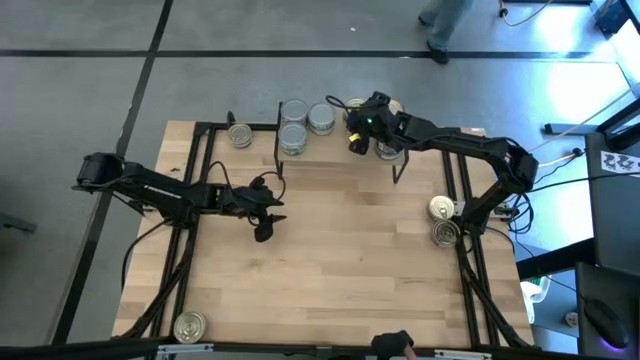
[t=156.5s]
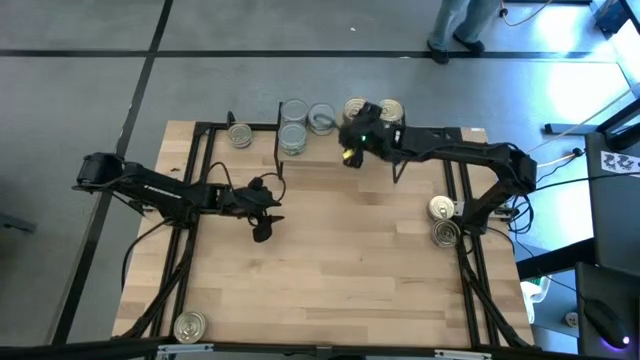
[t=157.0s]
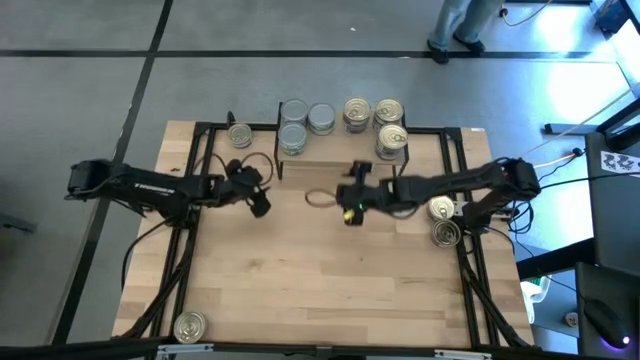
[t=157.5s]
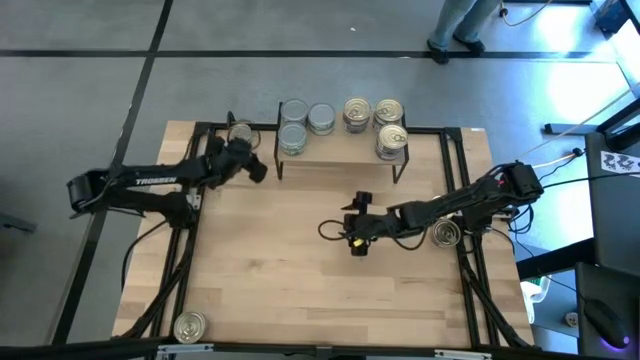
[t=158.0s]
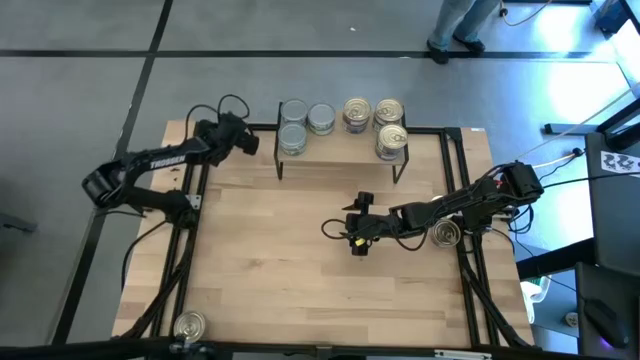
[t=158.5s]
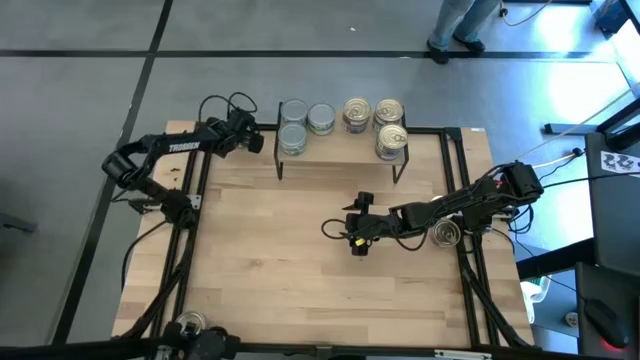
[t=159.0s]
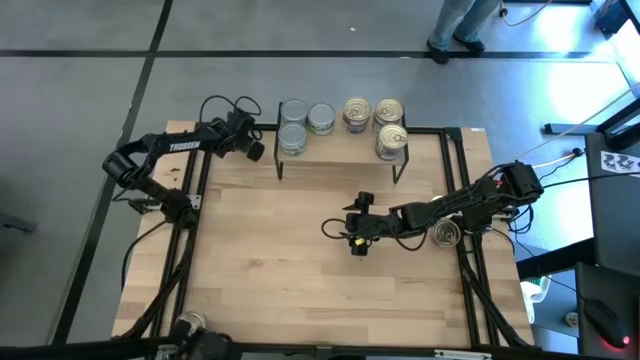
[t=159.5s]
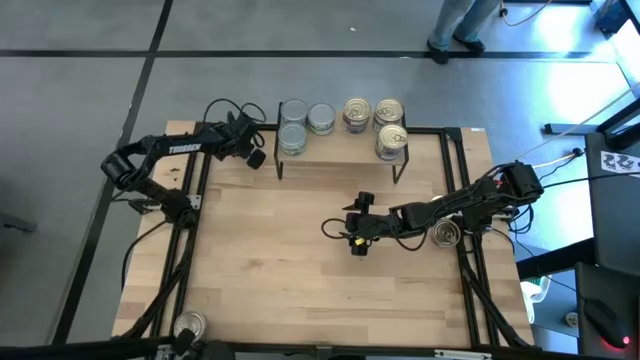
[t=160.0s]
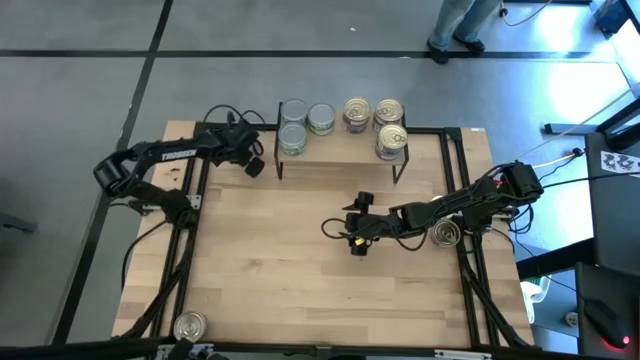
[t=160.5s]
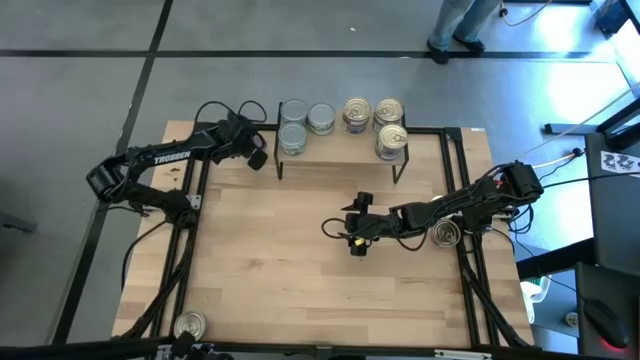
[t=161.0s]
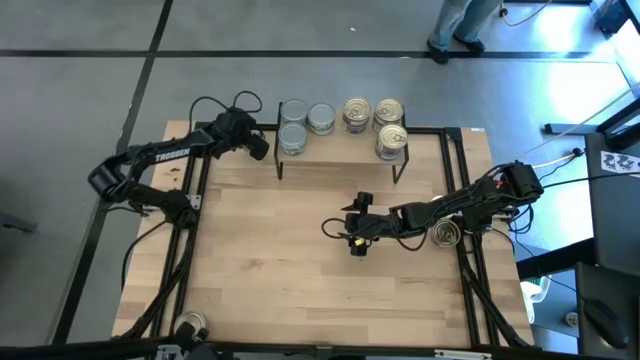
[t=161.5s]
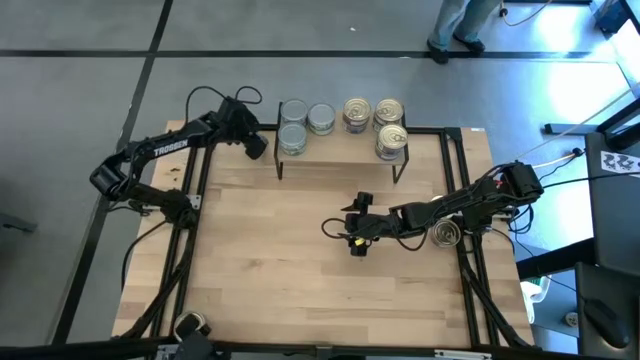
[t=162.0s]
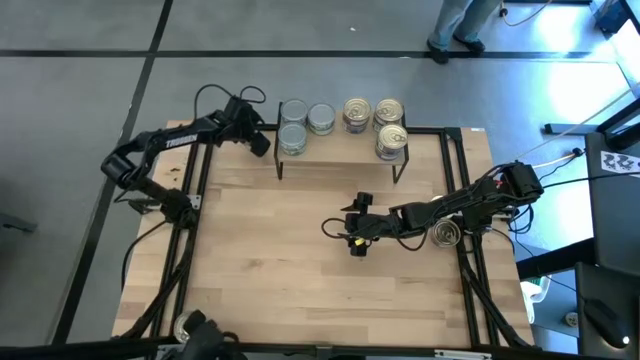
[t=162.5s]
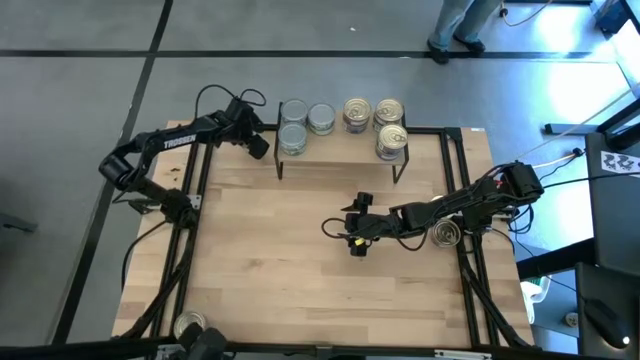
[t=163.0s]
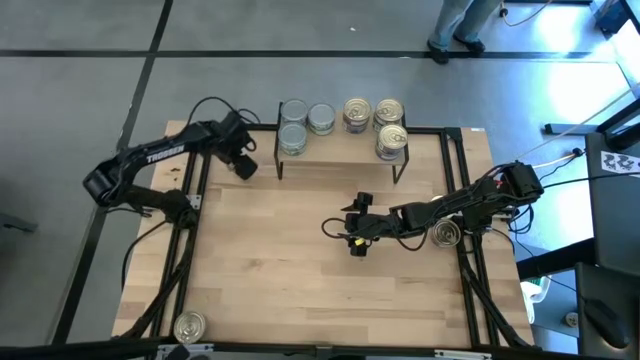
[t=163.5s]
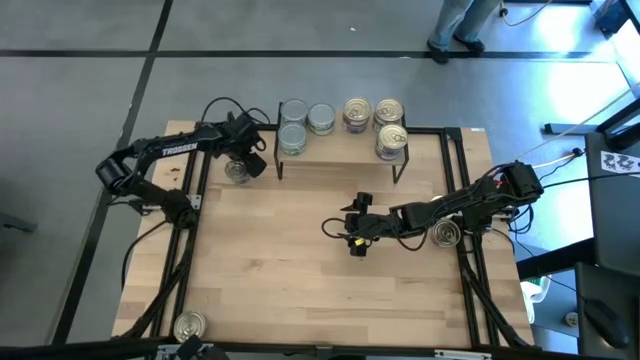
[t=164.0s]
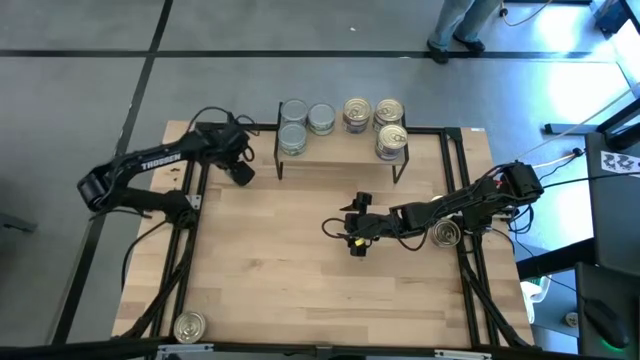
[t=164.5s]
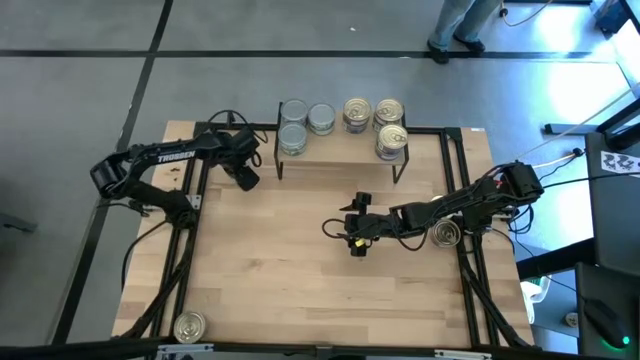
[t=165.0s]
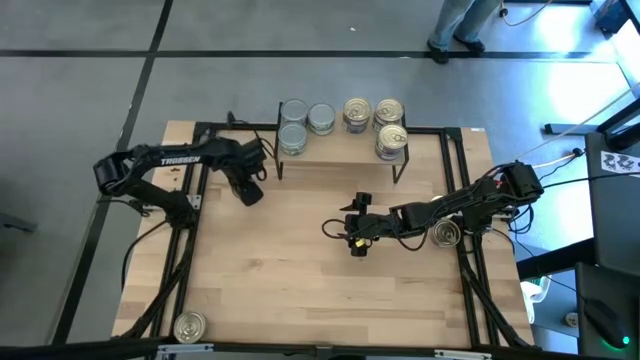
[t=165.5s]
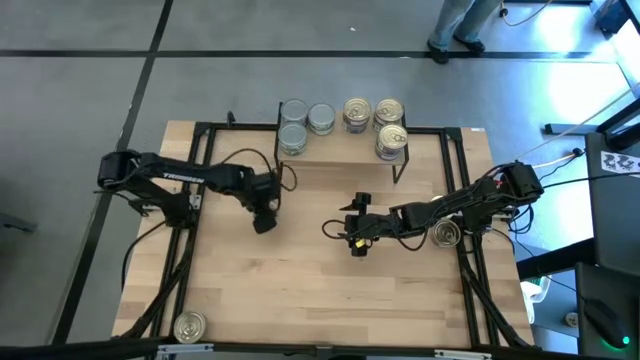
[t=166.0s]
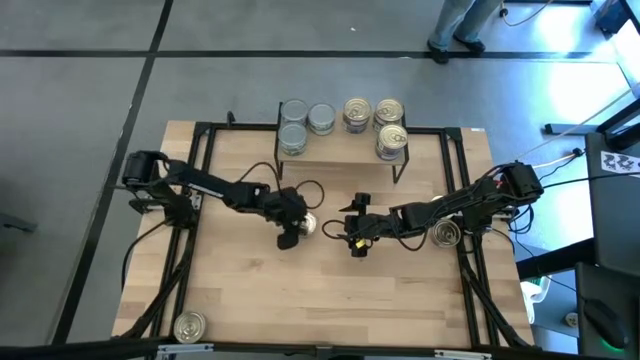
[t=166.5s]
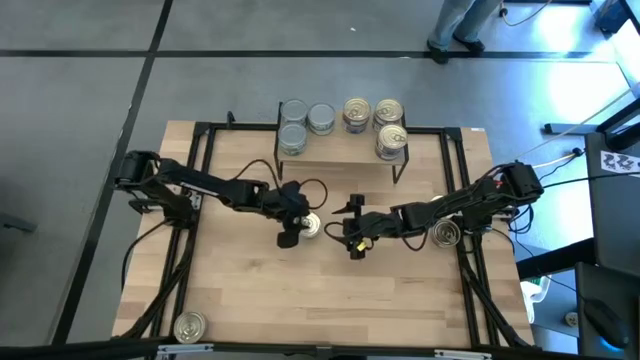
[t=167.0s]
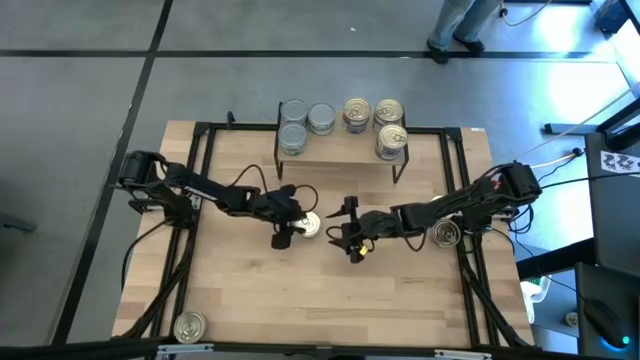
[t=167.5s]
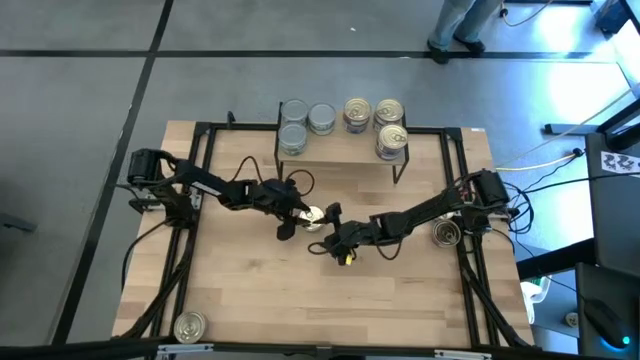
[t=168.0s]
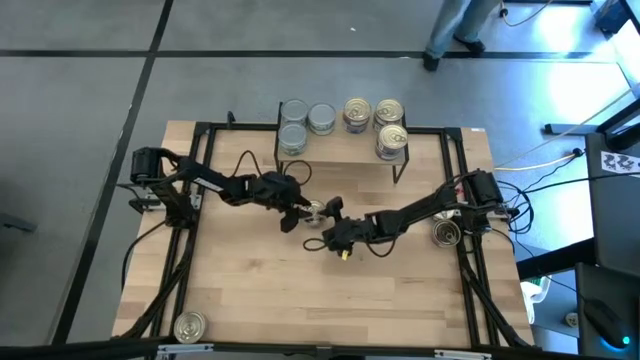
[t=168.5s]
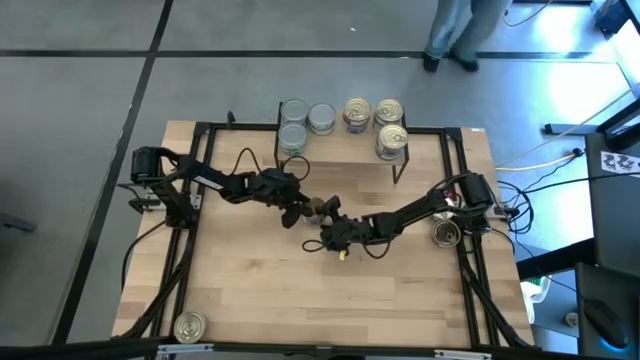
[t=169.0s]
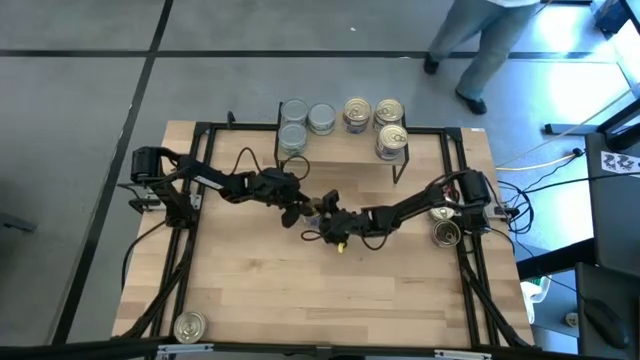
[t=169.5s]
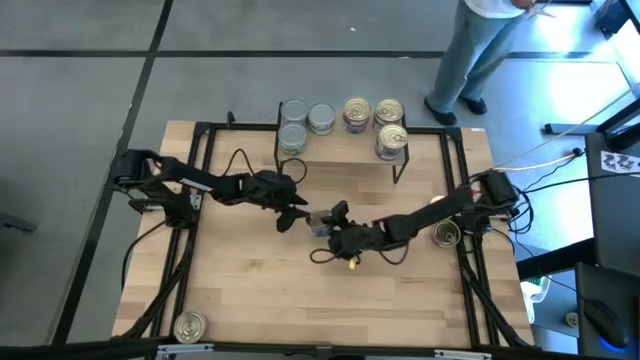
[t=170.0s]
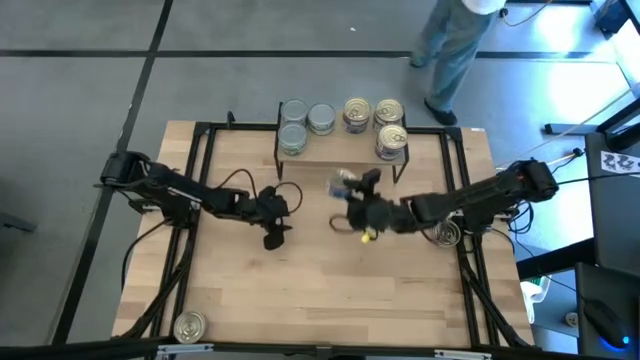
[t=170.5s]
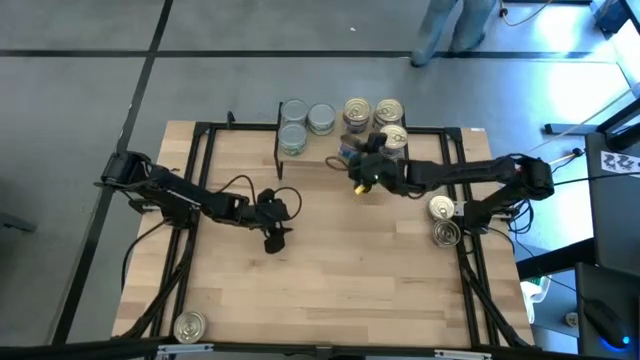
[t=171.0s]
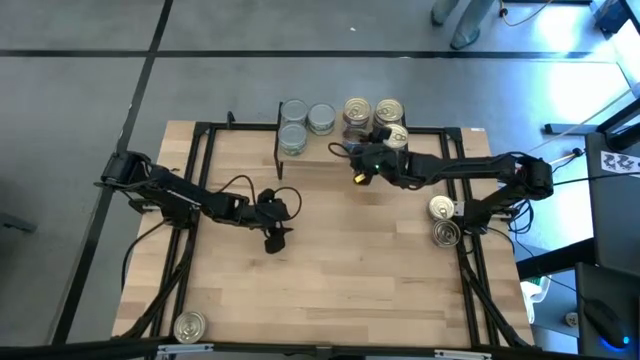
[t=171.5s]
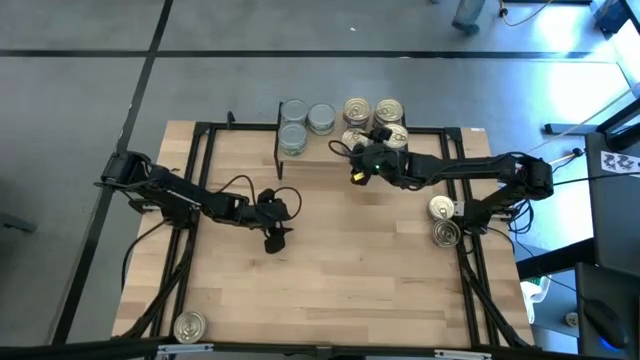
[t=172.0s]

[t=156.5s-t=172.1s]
Task: Stack canned seafood by type on shelf
Put the blue pink tuna can on the shelf

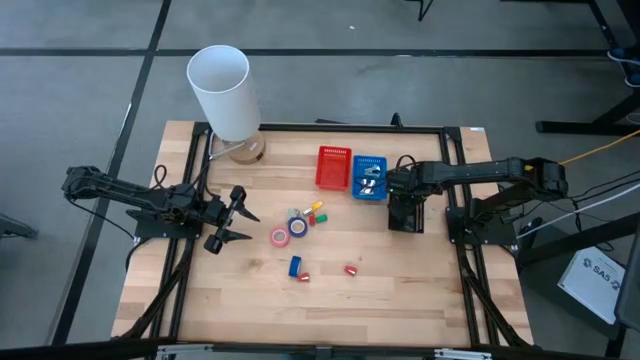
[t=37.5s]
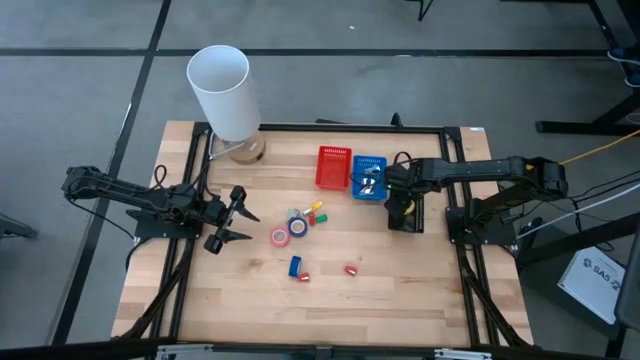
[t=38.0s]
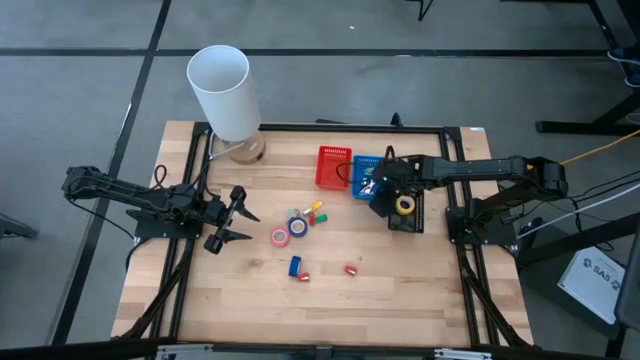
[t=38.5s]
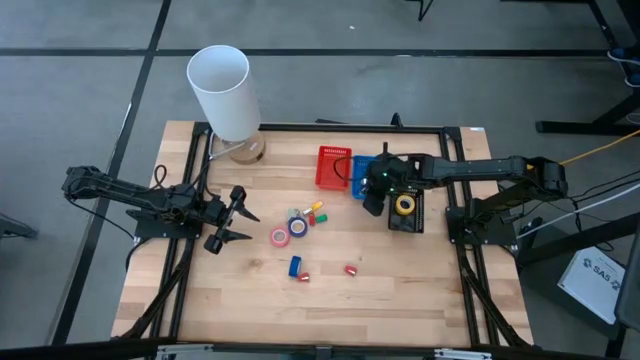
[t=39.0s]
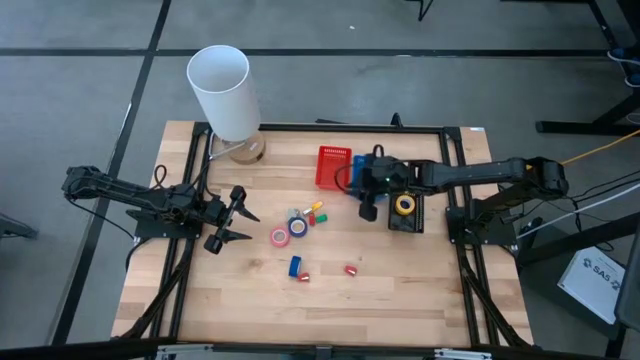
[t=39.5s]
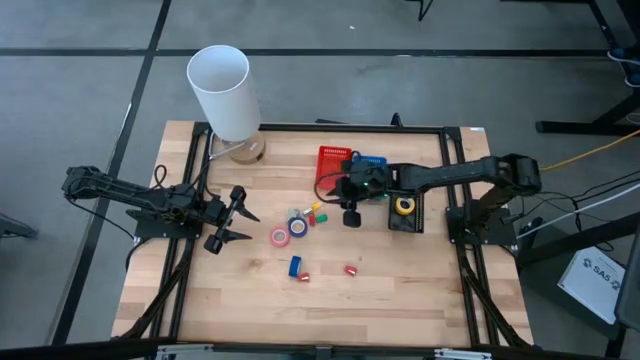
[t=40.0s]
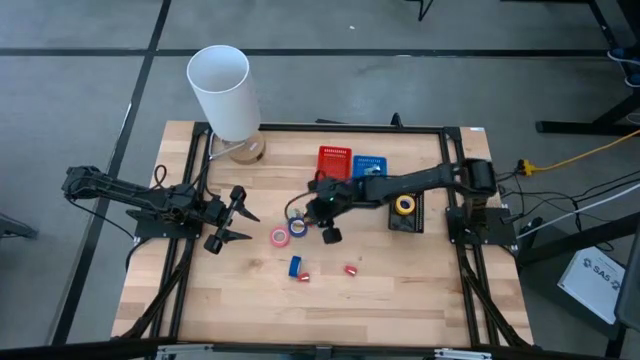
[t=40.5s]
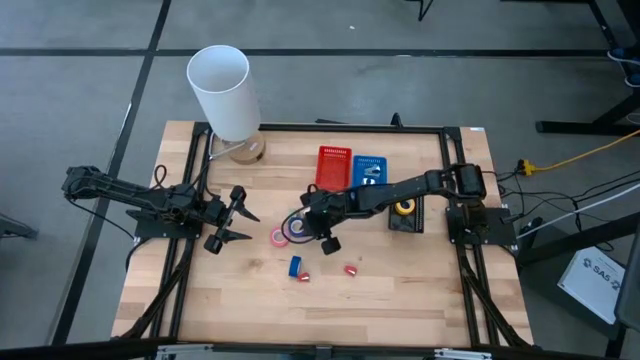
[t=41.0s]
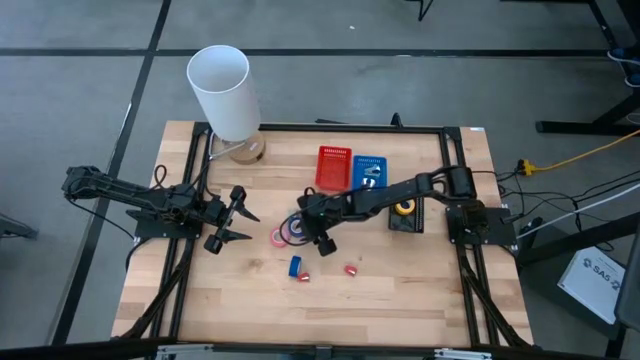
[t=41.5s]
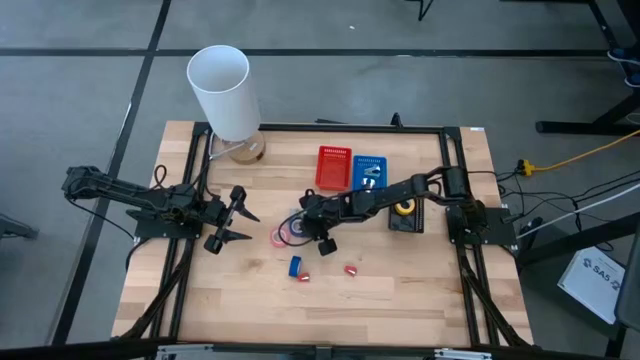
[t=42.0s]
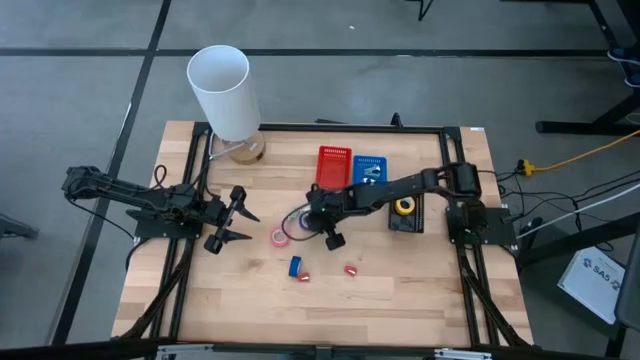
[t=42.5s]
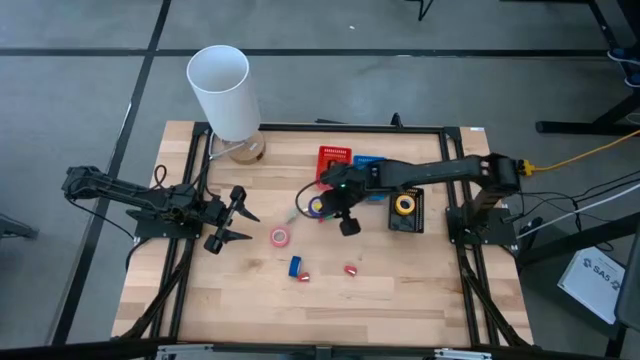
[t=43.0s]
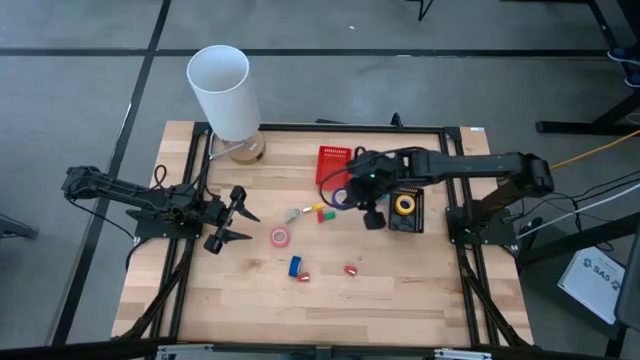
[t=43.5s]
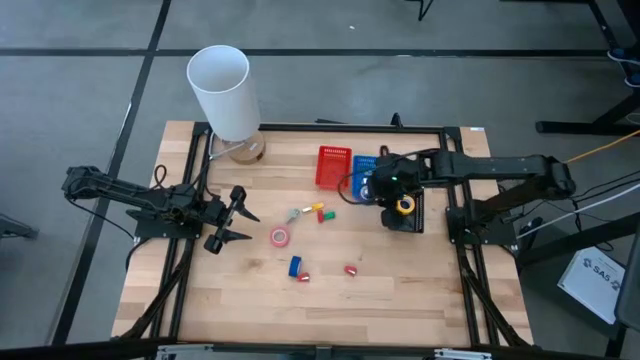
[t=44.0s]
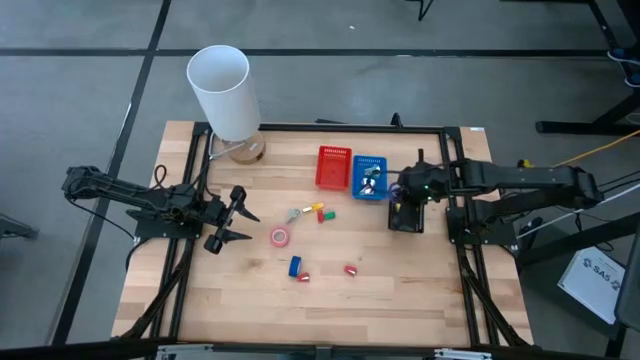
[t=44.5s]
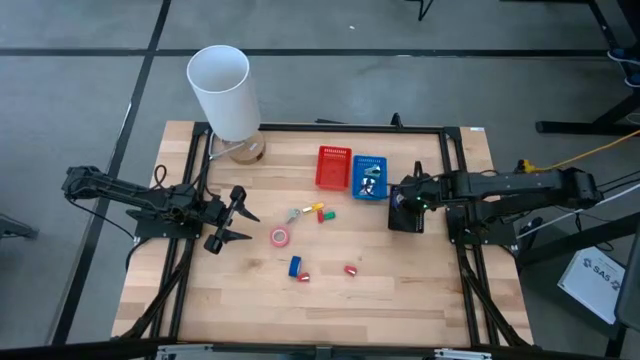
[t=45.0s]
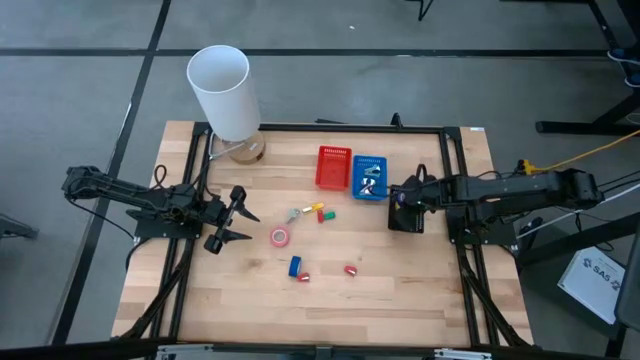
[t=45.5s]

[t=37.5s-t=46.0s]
Task: Pick and place Stapler, Stapler remover, tape
Put the top blue tape into the black bin
